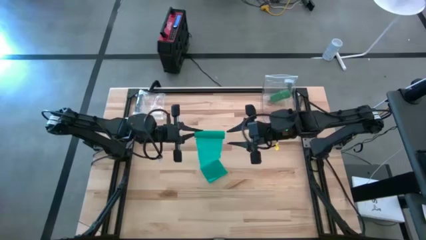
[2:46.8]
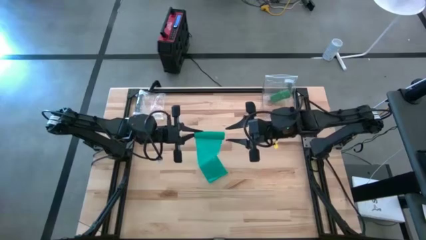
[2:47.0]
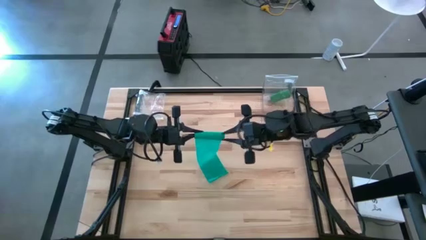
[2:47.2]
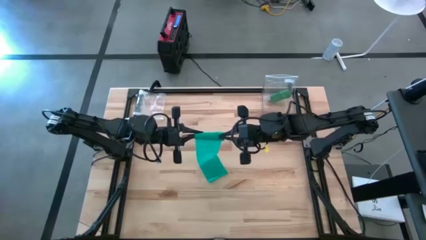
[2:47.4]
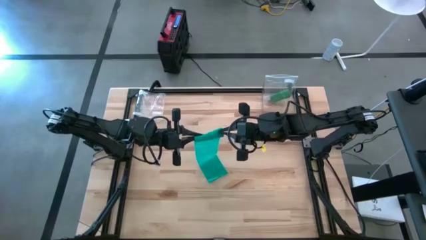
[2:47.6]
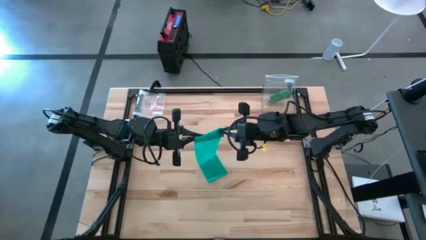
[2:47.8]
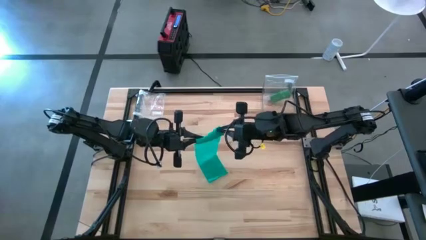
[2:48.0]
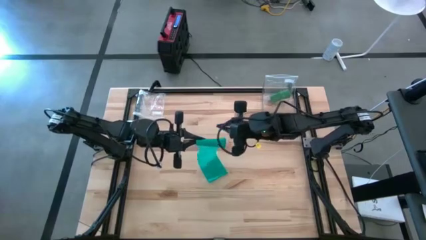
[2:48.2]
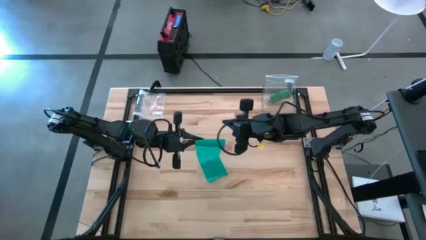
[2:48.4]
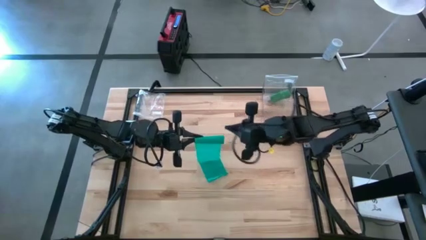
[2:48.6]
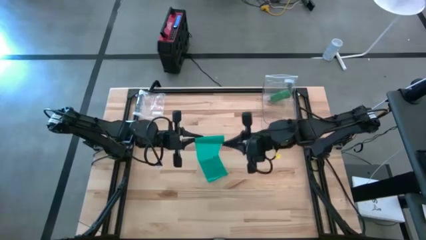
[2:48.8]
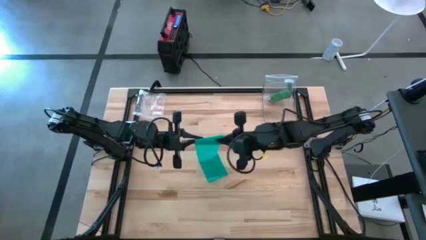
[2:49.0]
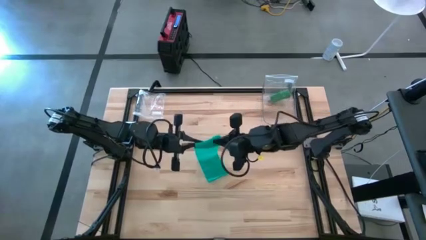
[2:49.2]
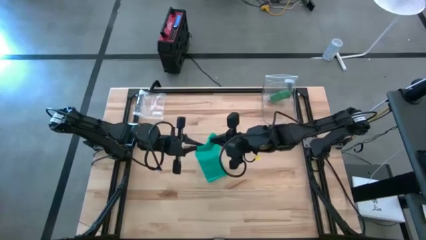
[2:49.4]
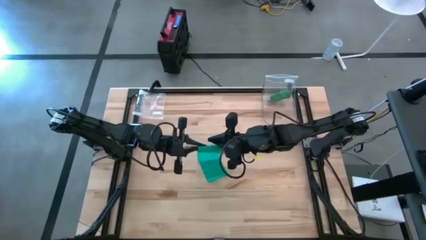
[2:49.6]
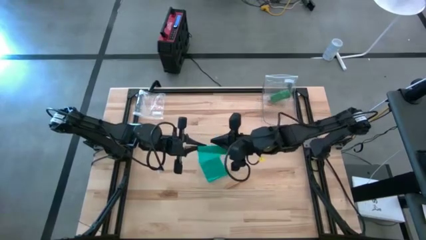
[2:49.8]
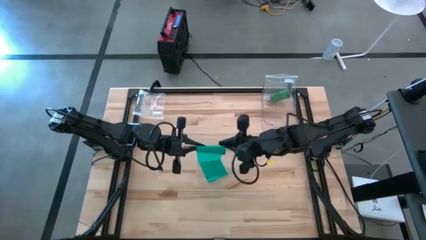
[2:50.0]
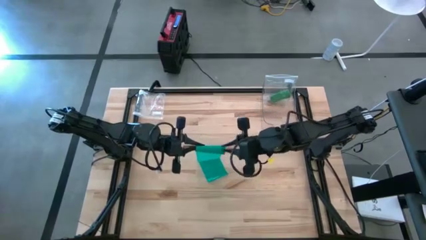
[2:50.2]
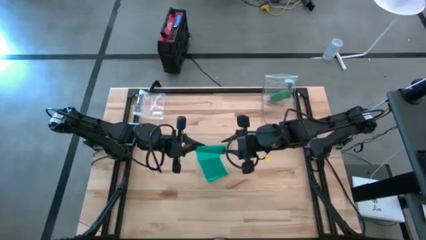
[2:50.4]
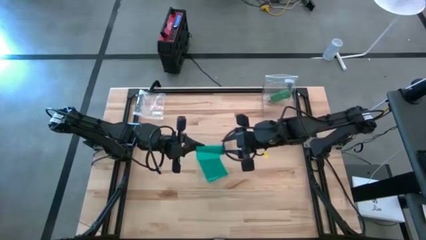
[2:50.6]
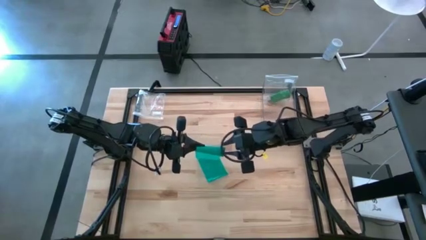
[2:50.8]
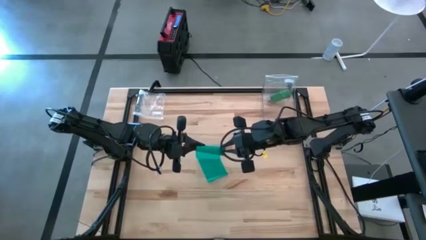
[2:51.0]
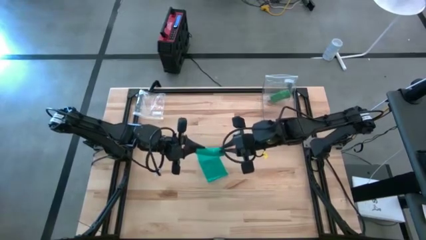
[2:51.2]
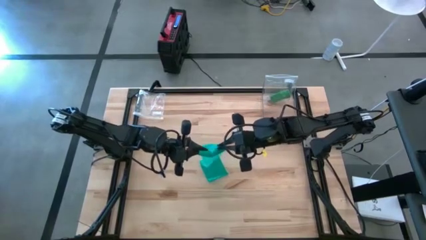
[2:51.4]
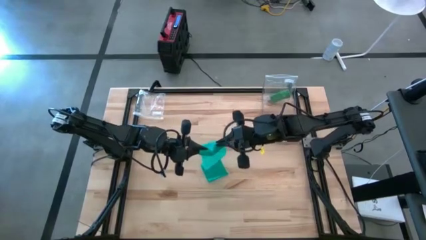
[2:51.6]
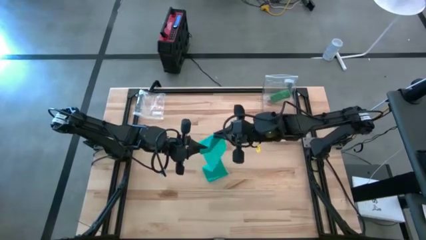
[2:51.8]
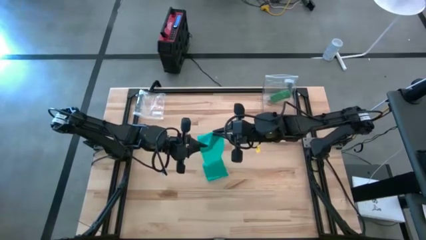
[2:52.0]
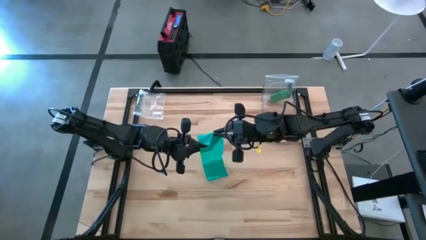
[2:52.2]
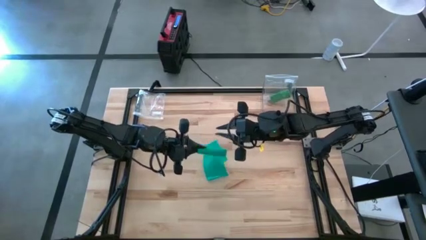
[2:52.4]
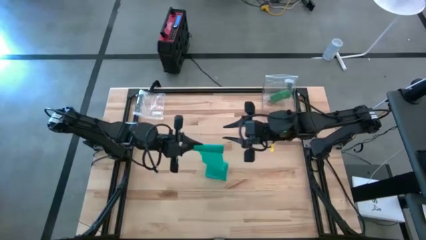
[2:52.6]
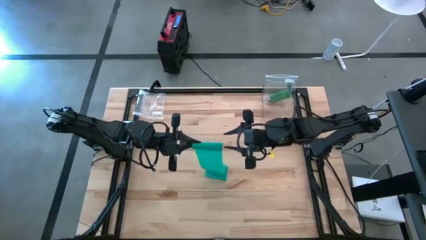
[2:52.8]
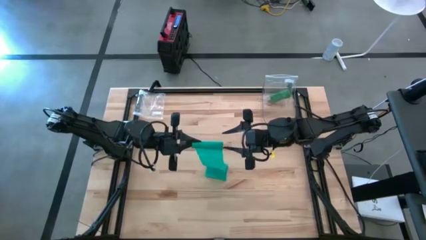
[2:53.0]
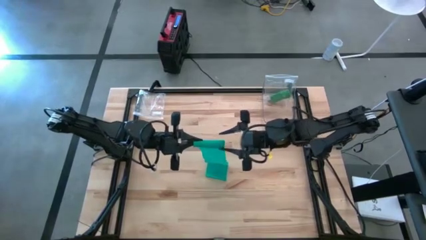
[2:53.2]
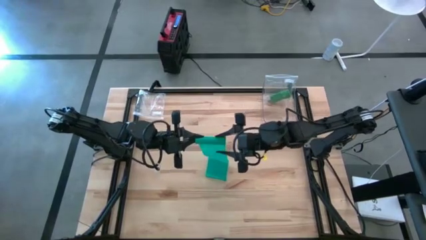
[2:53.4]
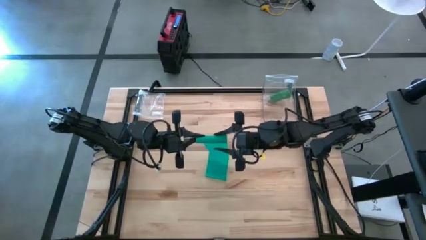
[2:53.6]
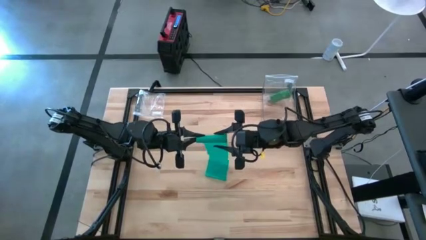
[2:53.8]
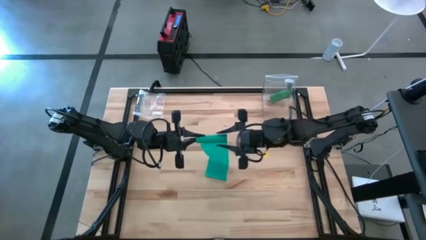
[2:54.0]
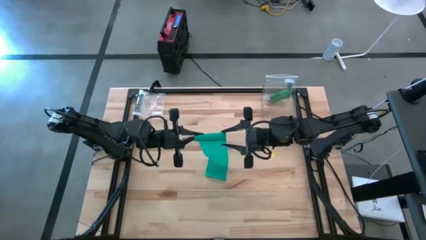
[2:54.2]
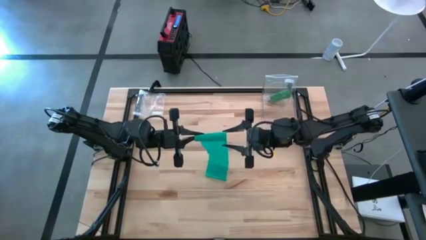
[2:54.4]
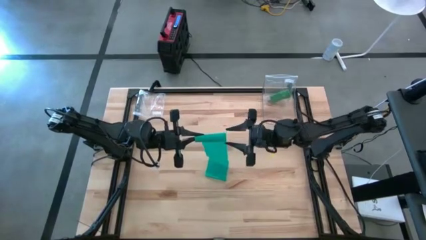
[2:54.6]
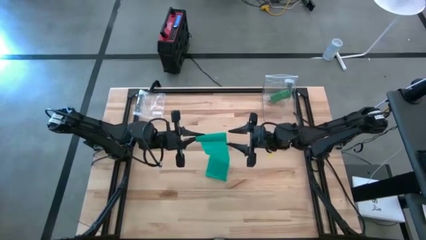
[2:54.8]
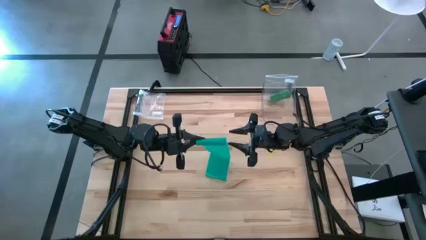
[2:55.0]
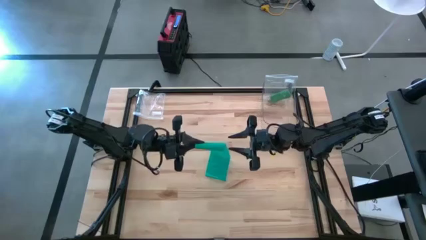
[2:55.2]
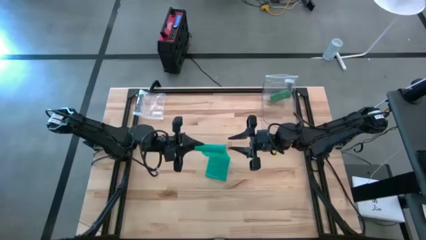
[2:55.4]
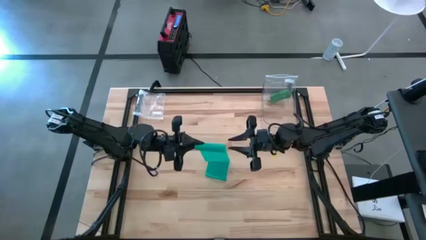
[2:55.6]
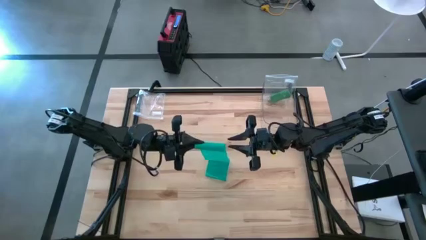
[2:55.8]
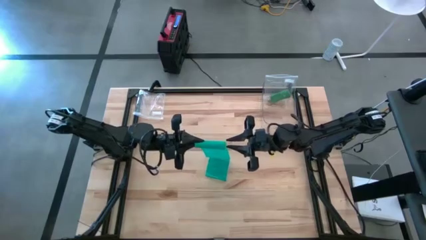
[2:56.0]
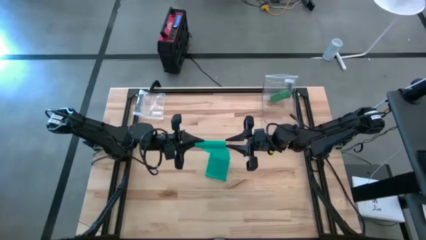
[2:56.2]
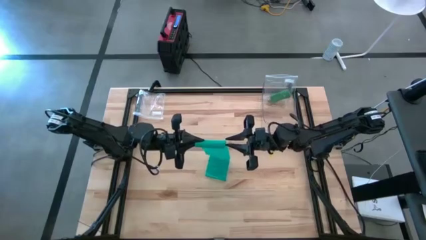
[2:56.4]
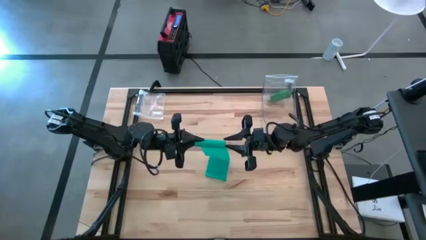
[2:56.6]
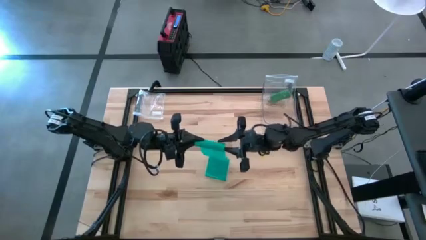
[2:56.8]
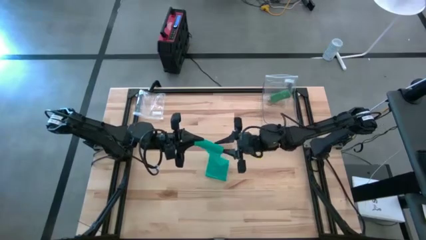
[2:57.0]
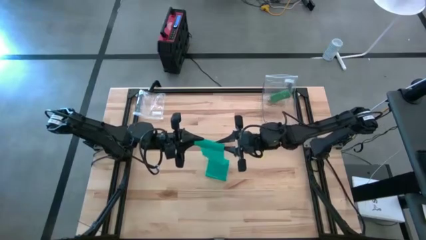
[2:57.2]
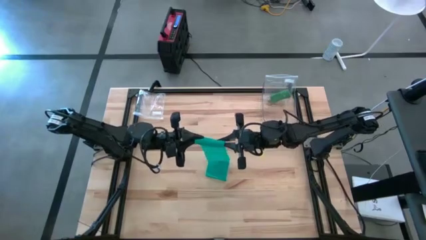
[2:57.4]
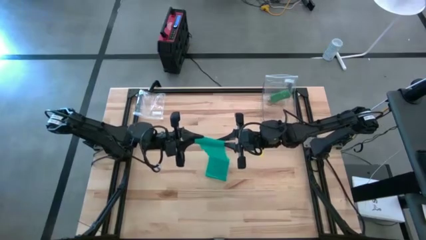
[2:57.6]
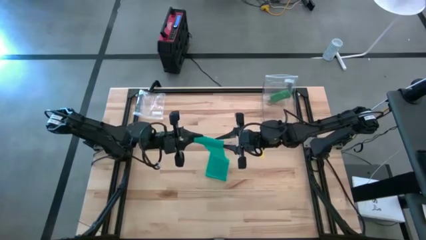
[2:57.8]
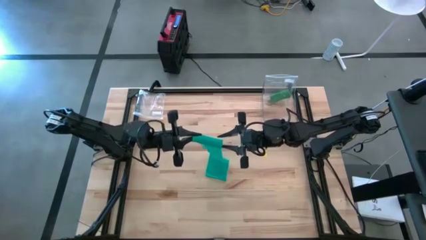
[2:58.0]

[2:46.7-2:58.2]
Task: Roll bandage
Roll the dark green bandage

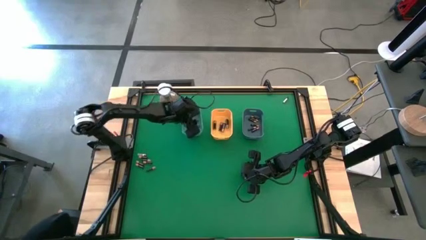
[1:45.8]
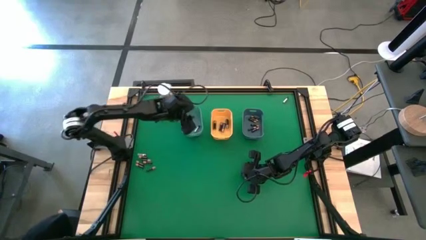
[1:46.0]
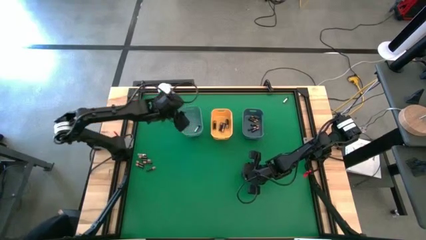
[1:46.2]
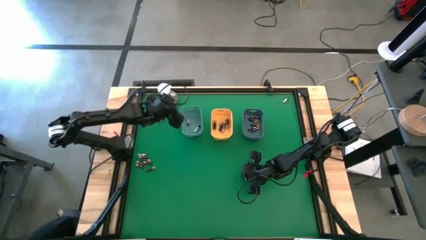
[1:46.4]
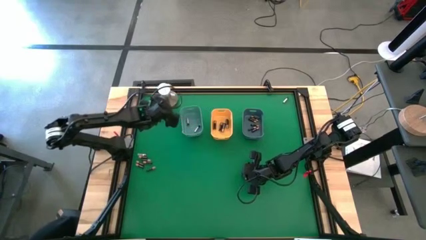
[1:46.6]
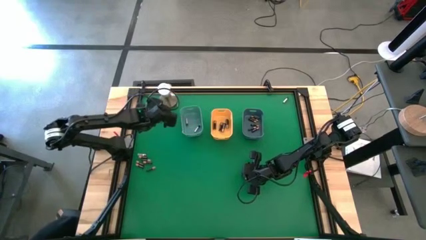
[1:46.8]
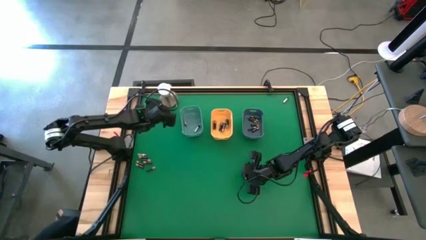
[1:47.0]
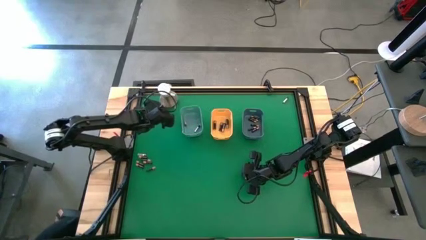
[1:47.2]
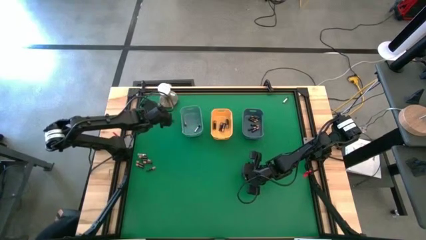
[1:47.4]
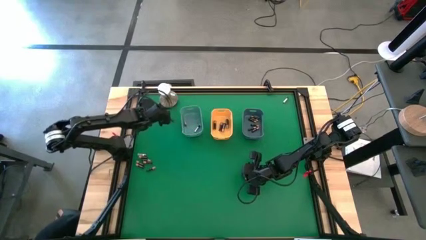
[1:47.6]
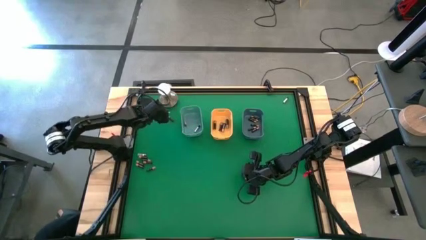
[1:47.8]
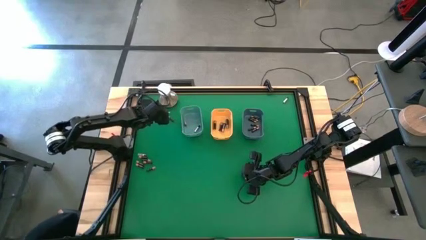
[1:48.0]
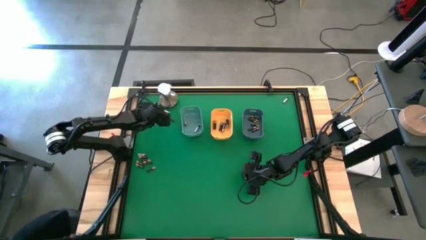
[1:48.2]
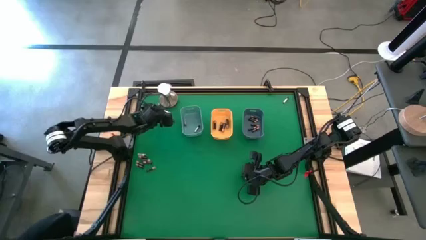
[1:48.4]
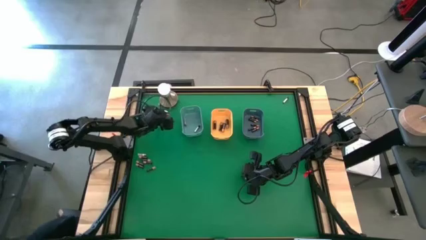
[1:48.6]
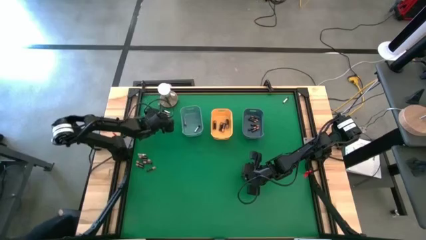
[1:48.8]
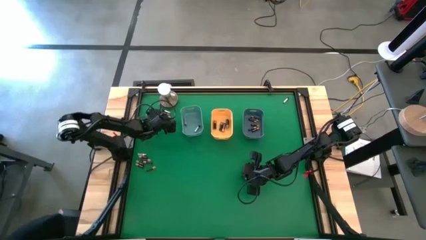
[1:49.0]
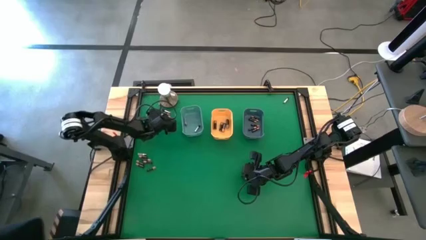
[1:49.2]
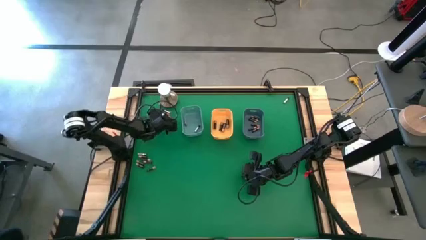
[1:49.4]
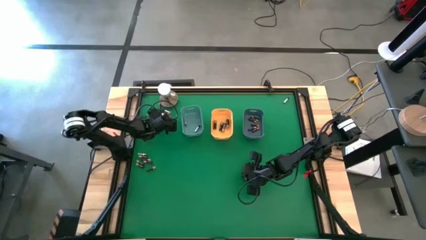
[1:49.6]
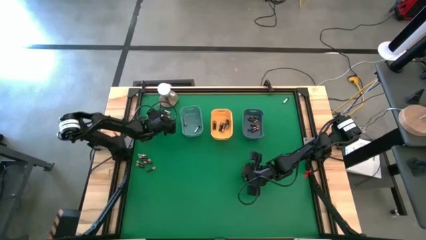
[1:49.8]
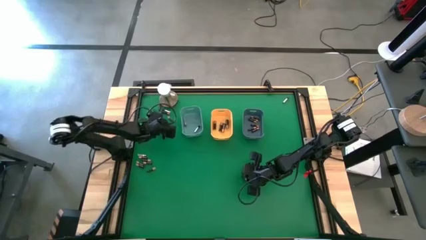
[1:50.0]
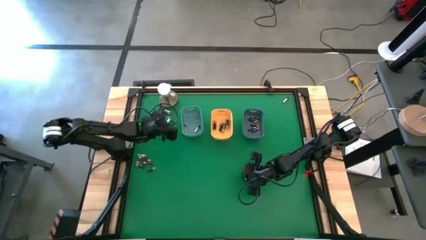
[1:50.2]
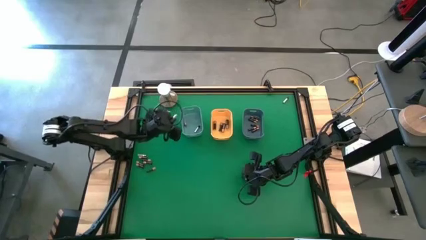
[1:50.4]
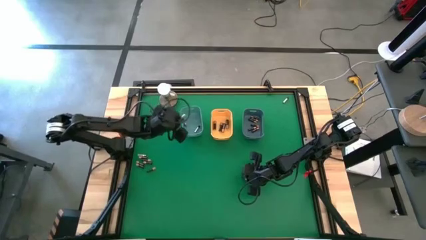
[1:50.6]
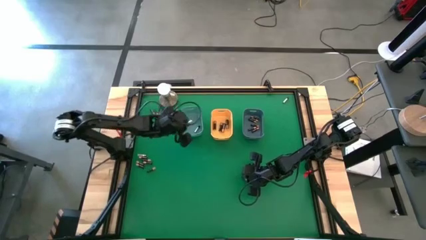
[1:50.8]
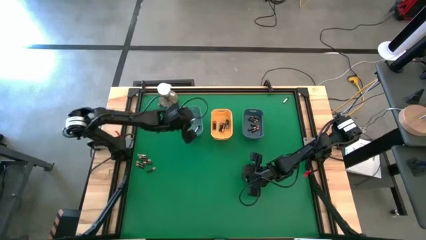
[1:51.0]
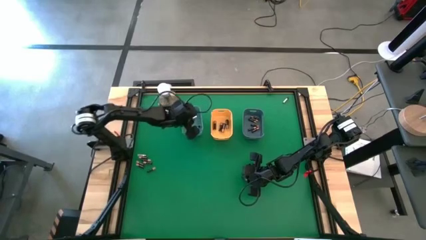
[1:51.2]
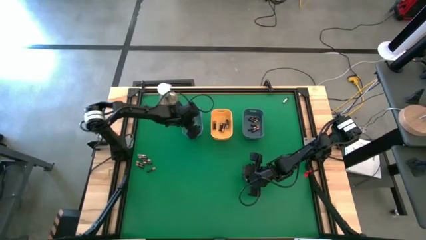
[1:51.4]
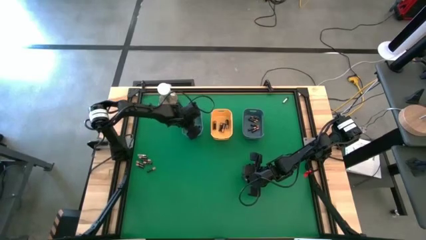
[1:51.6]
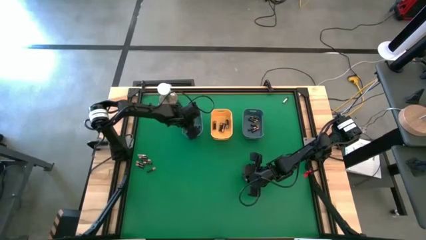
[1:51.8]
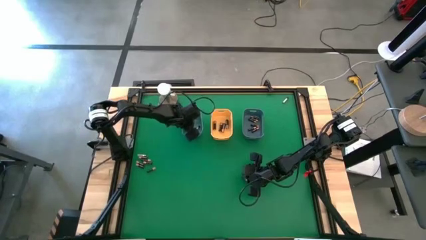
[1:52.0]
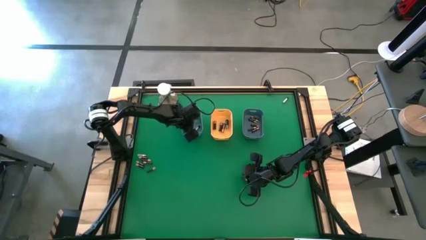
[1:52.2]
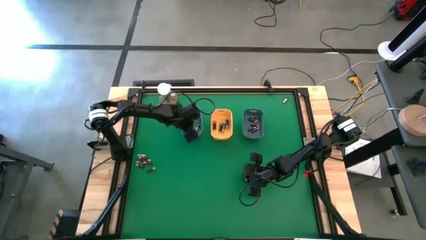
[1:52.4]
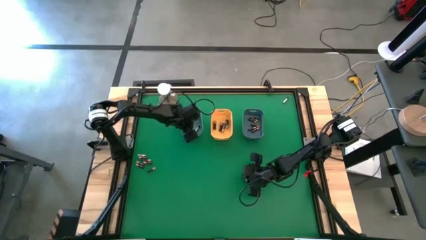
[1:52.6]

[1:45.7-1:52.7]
Task: Sort batteries
Put the silver battery into the green bin
